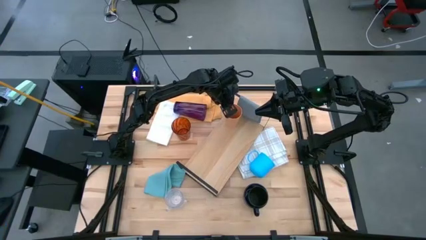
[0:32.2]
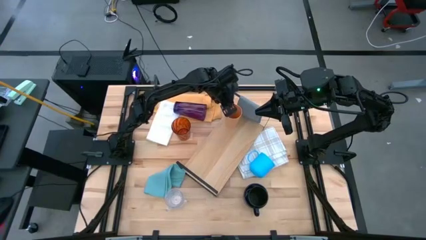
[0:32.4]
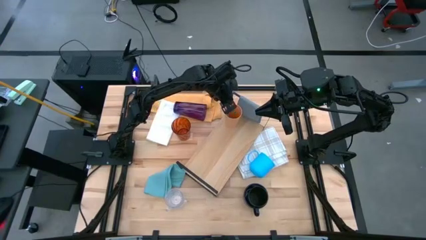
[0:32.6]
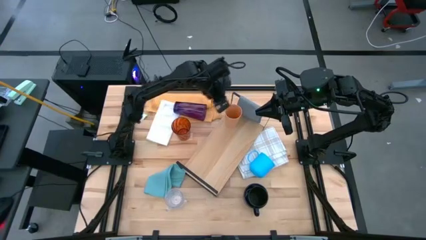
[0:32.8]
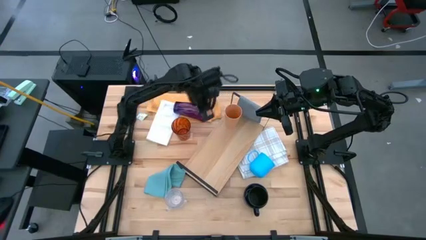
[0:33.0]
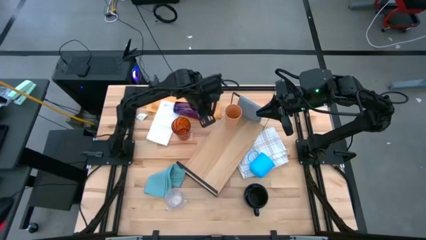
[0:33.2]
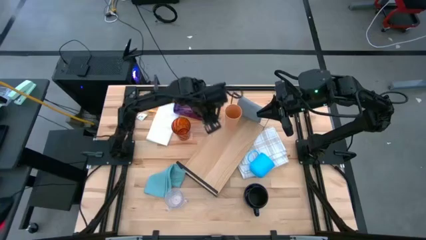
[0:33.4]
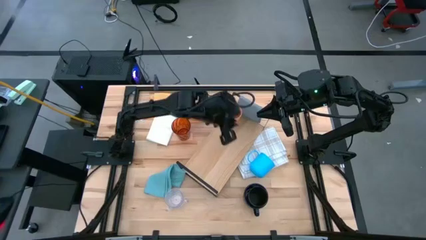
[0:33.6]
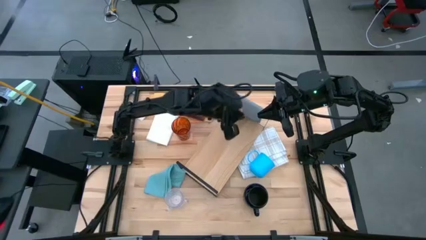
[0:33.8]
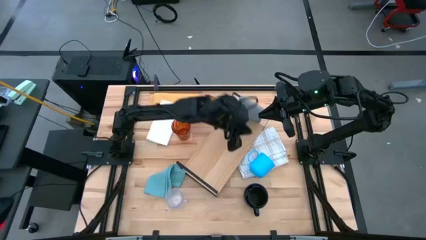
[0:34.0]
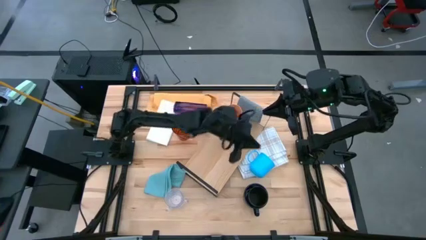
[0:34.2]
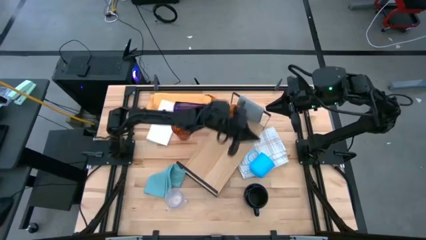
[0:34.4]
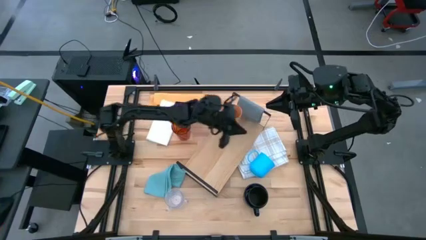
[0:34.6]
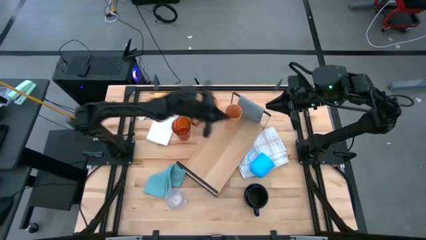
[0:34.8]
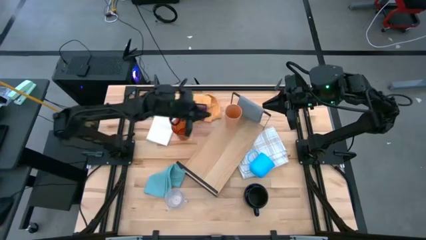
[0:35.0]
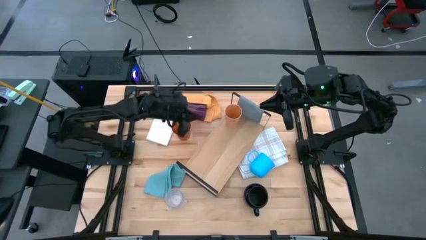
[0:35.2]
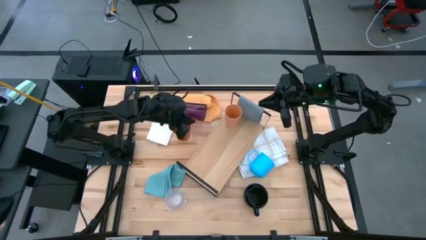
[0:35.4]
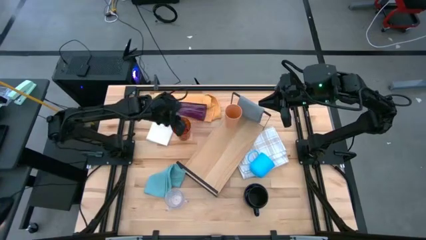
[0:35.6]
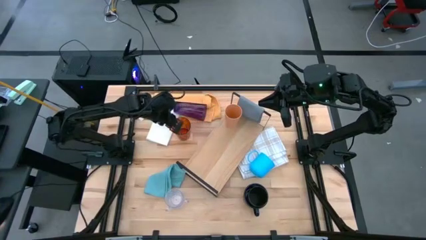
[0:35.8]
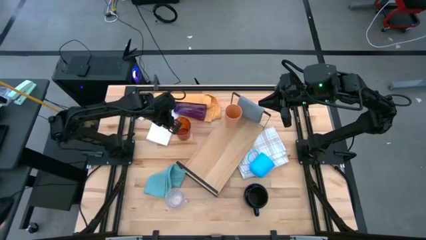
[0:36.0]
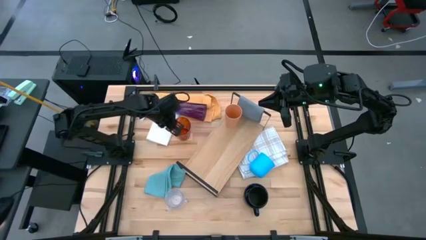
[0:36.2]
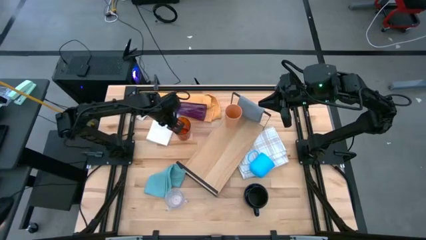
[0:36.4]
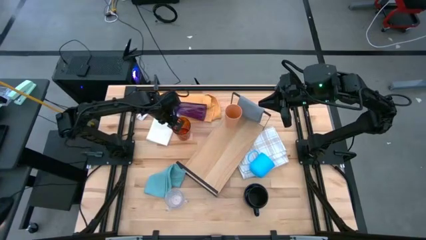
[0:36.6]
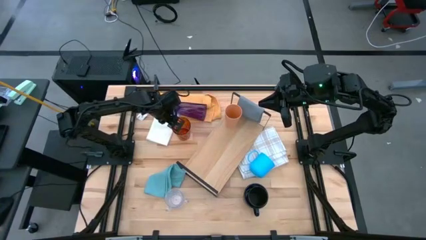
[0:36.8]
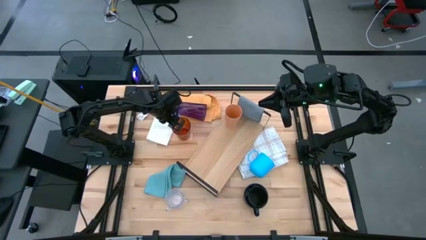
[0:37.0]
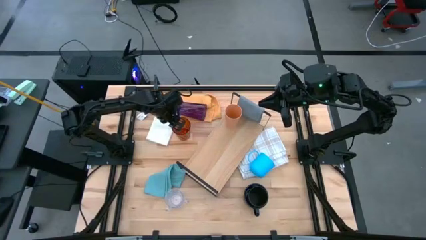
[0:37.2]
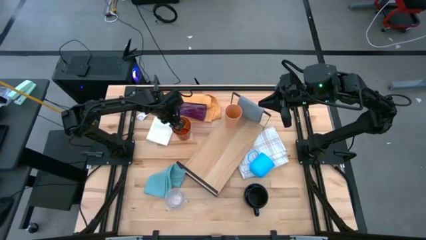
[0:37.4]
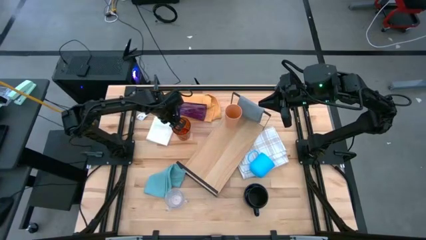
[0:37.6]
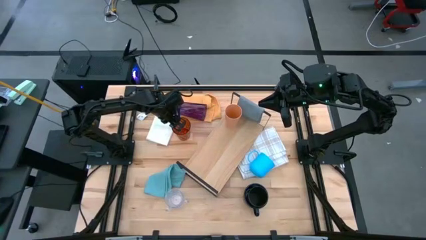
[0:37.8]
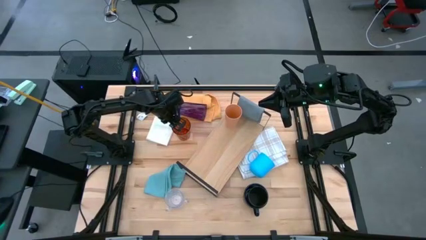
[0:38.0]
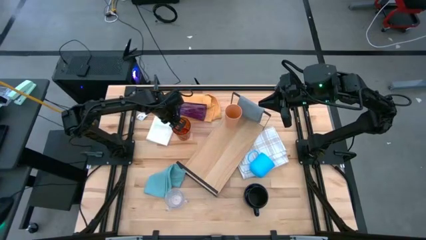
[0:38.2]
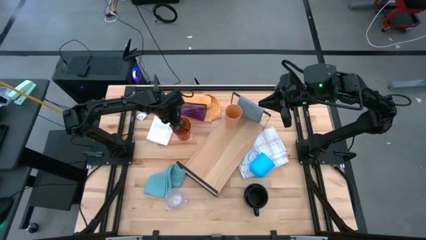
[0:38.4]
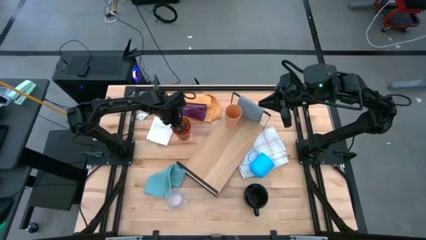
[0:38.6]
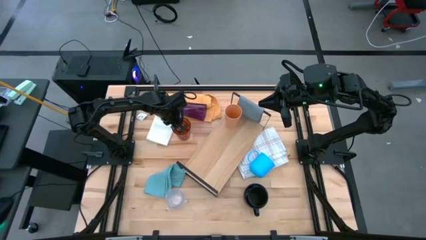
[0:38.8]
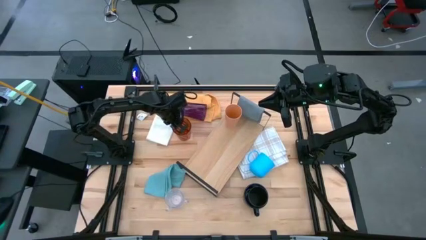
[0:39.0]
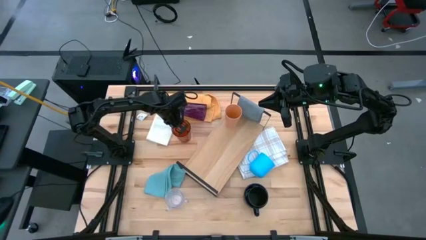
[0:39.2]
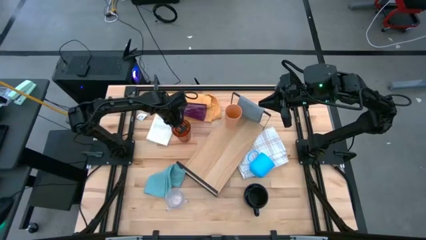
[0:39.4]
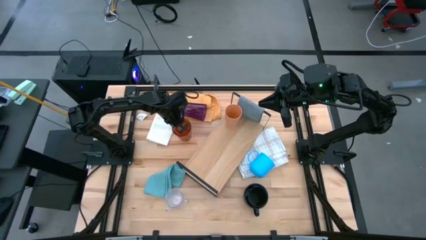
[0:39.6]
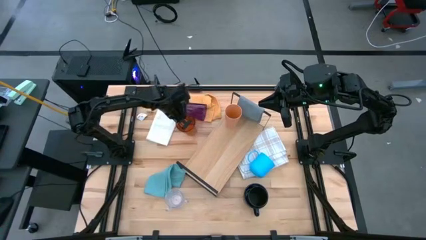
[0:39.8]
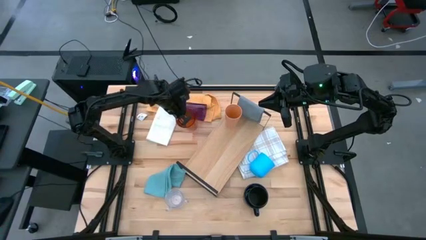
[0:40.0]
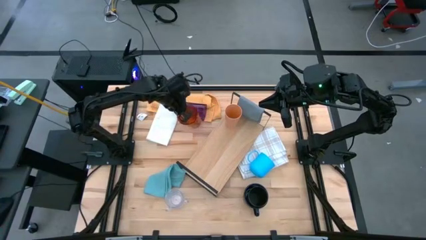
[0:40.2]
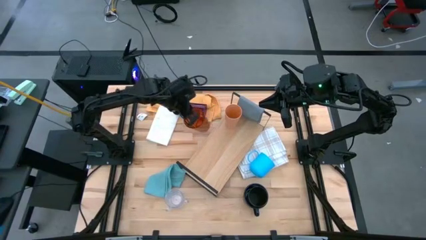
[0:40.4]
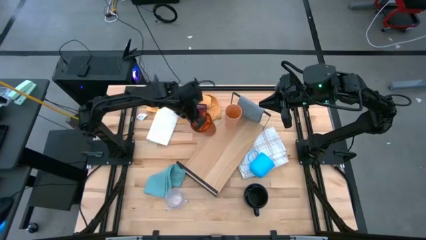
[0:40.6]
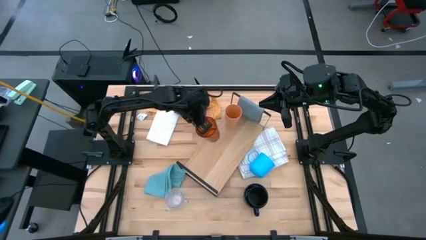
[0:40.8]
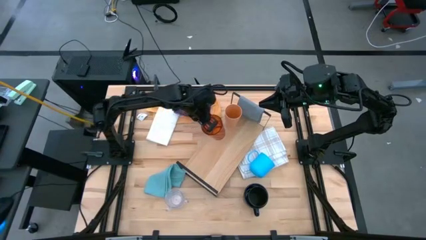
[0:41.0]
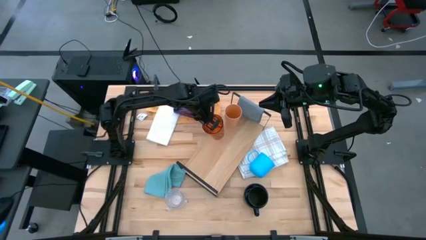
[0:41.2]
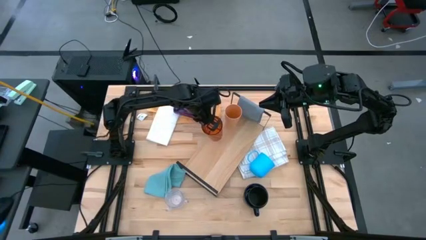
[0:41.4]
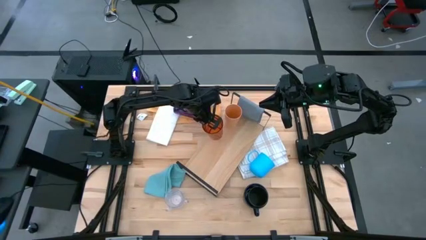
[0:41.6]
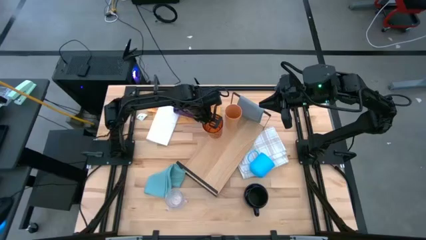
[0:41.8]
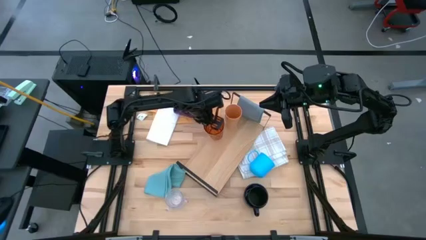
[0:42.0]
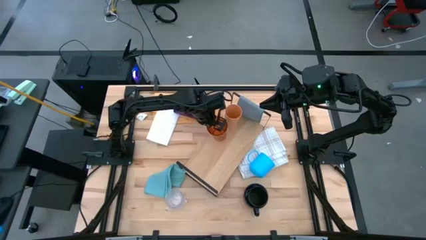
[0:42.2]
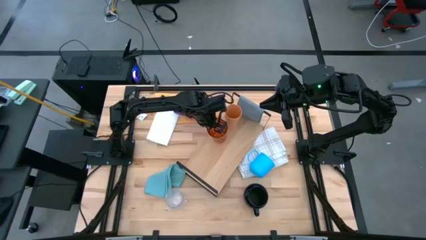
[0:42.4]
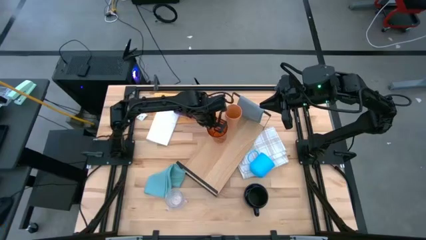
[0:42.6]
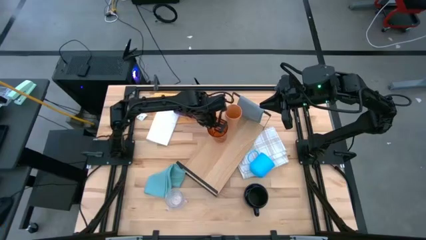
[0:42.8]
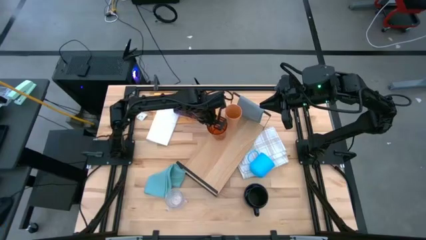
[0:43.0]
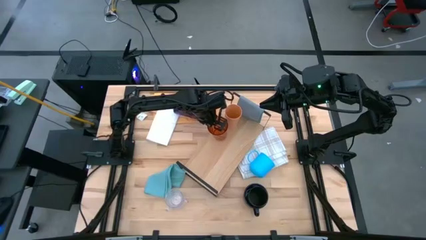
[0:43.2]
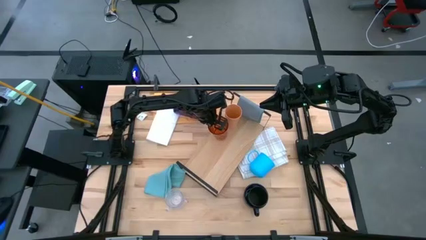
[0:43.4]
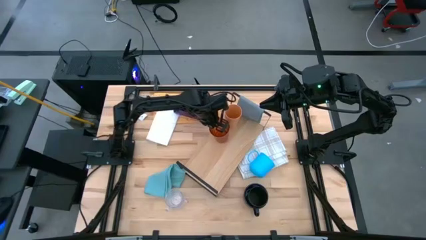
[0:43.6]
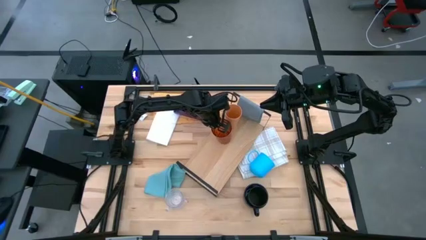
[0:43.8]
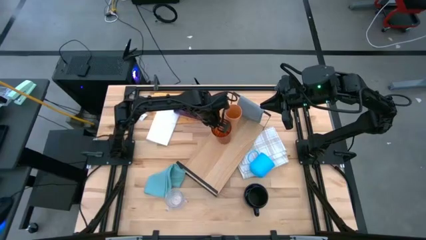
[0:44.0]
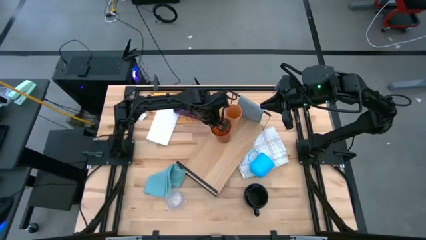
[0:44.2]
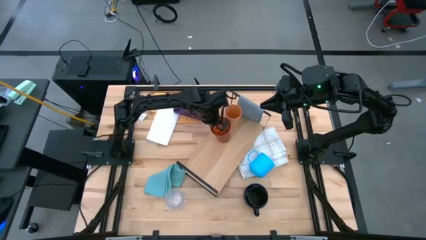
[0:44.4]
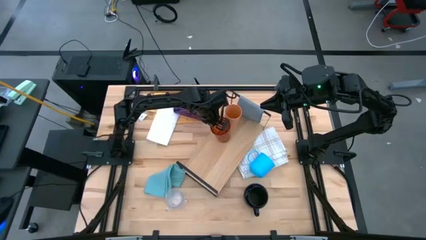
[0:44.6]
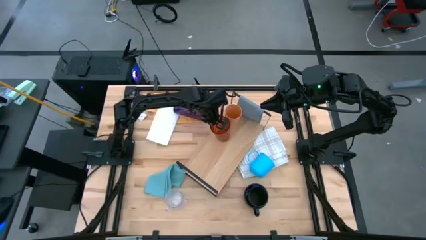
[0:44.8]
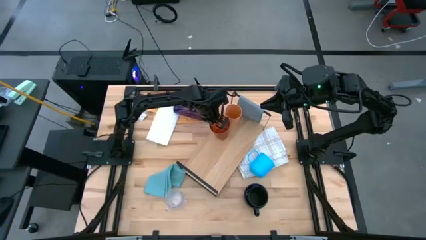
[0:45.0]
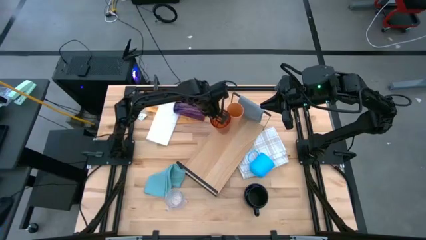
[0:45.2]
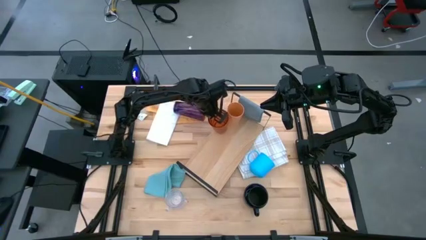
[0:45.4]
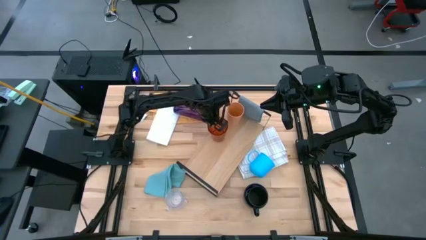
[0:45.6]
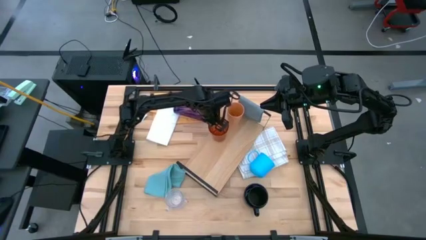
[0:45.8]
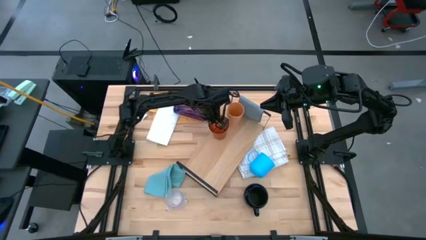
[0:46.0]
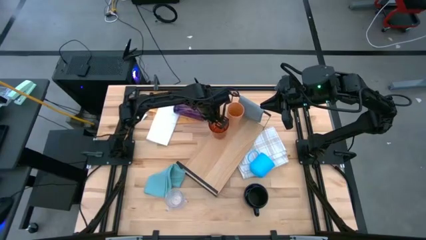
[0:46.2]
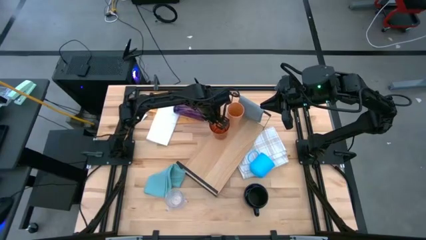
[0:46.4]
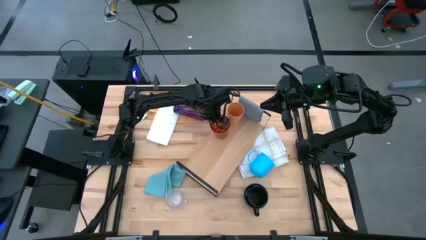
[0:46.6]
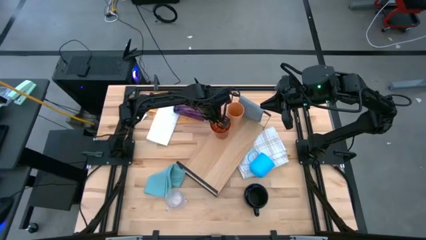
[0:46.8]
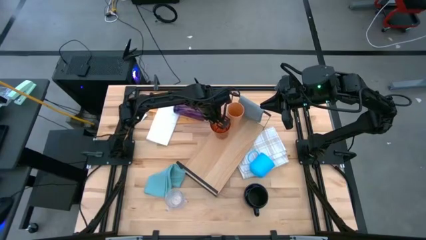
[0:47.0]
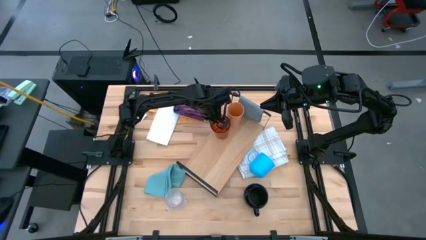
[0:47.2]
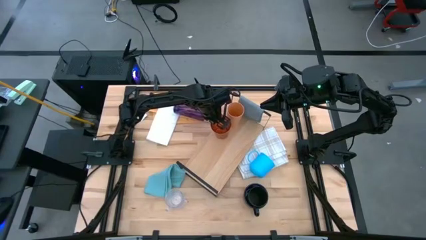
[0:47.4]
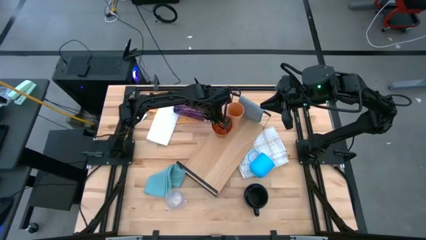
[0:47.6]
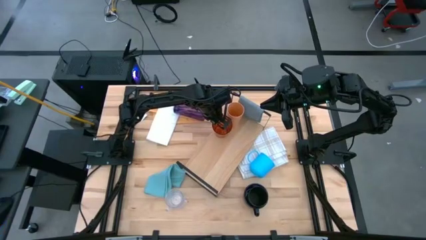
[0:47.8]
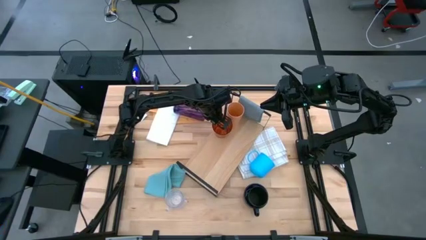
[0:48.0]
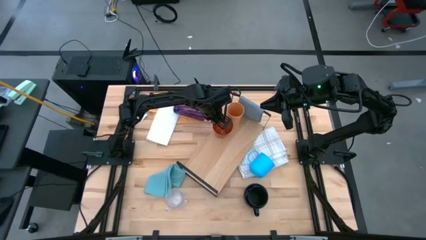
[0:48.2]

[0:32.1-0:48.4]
Task: Stack small to large cups/mugs on shelf
Put the orange glass on the shelf
